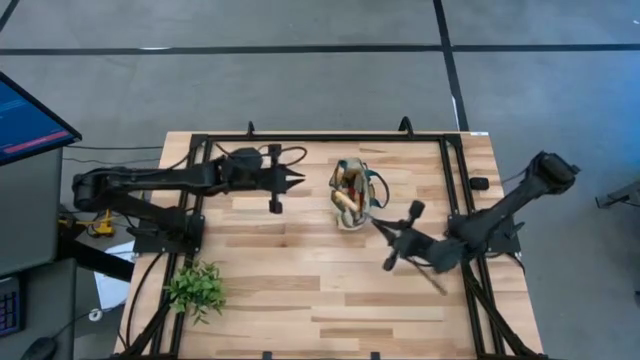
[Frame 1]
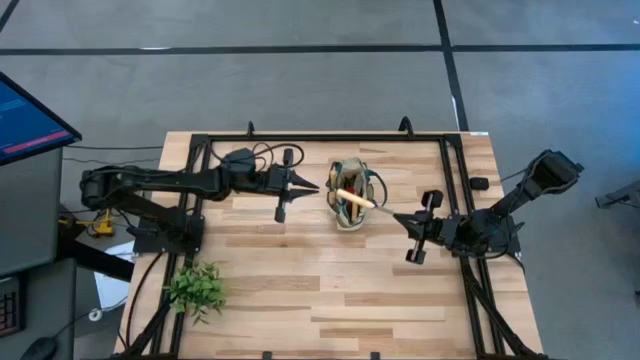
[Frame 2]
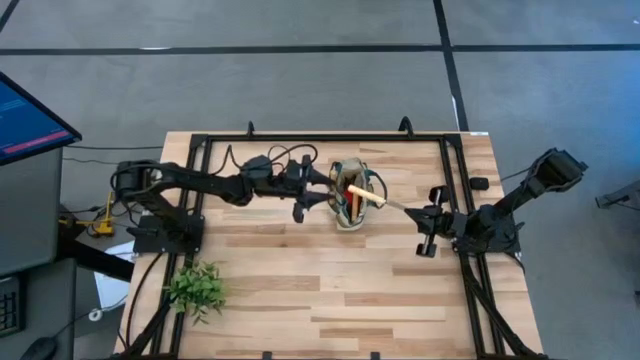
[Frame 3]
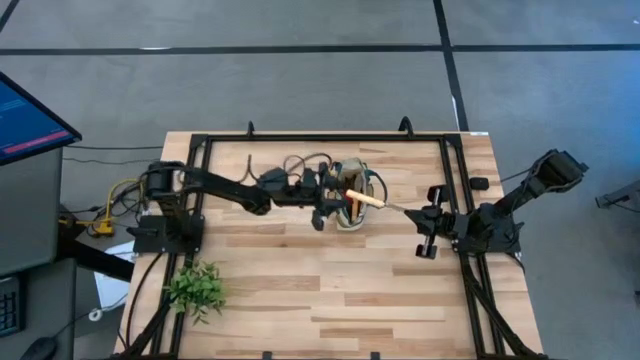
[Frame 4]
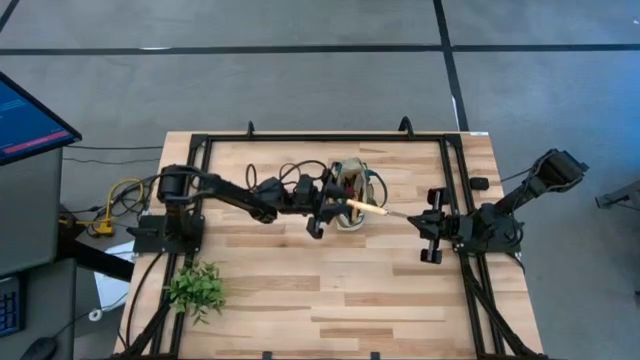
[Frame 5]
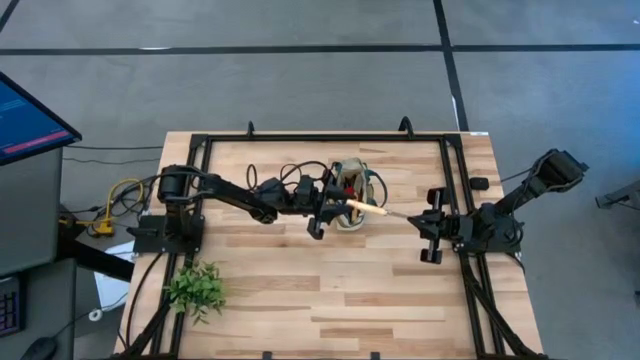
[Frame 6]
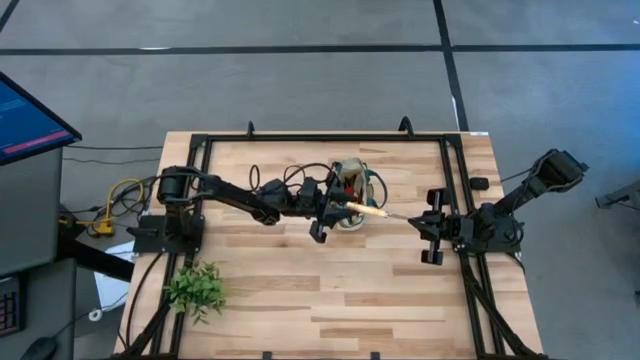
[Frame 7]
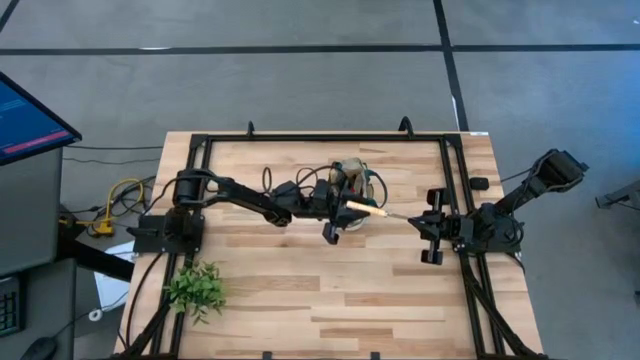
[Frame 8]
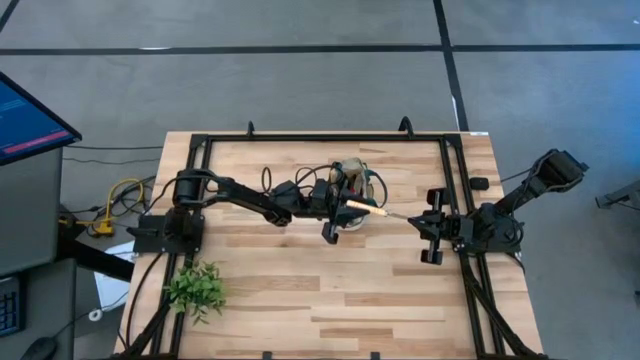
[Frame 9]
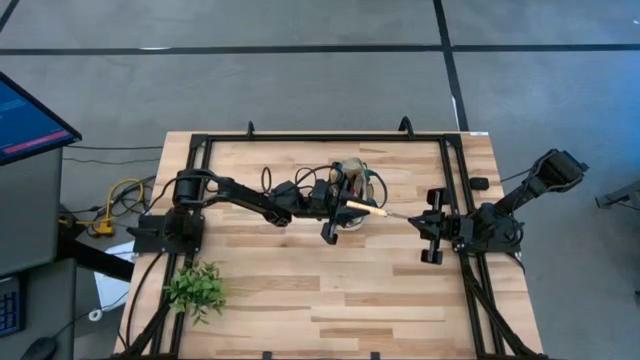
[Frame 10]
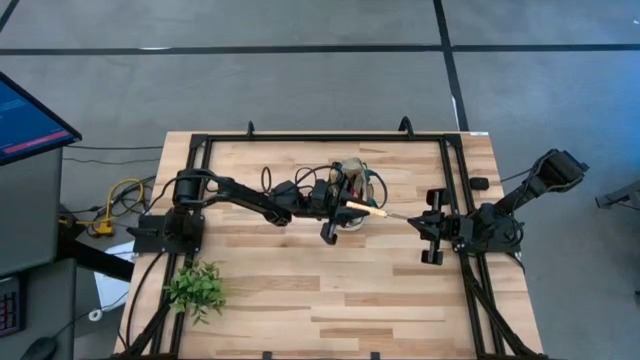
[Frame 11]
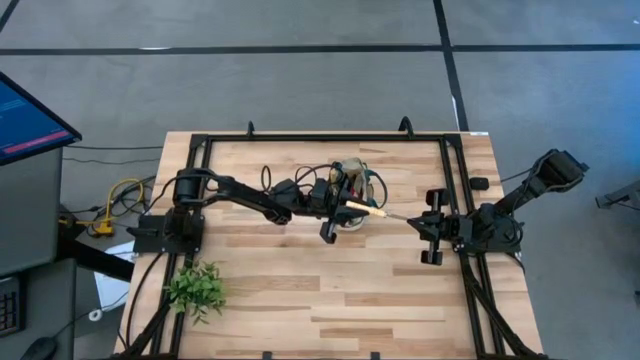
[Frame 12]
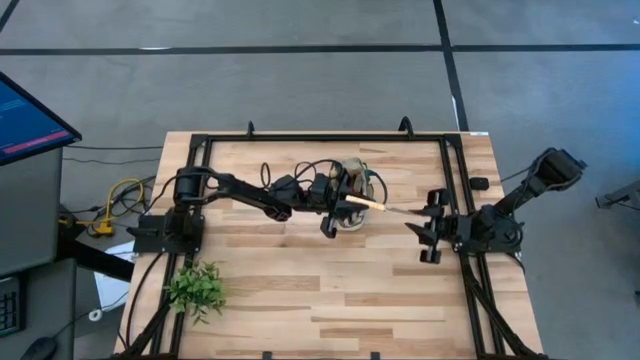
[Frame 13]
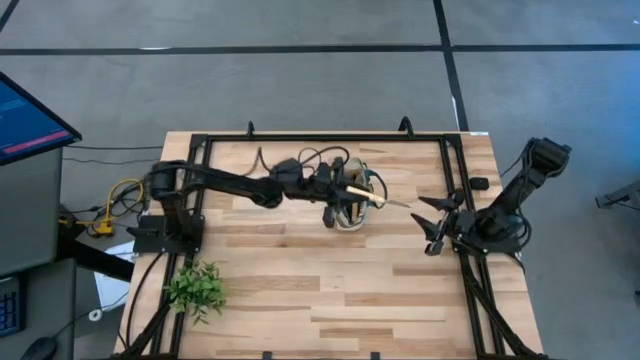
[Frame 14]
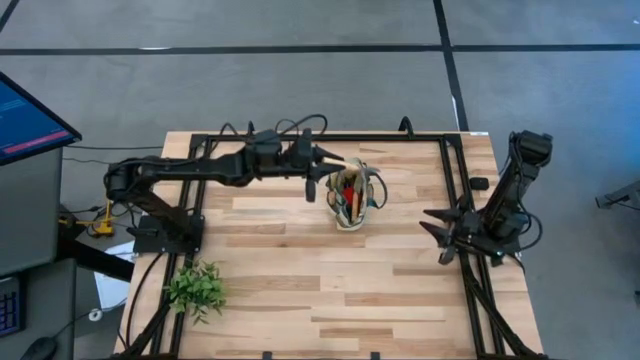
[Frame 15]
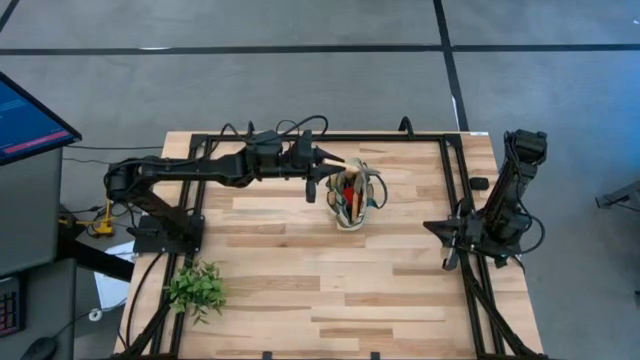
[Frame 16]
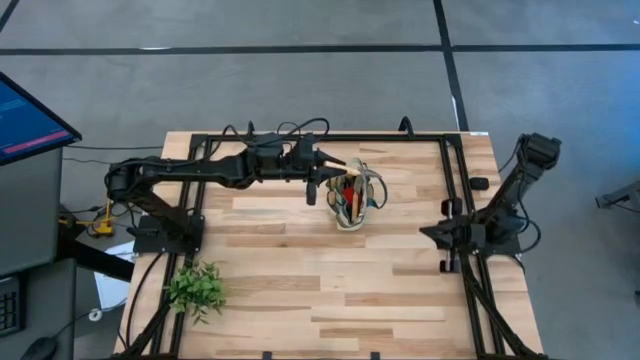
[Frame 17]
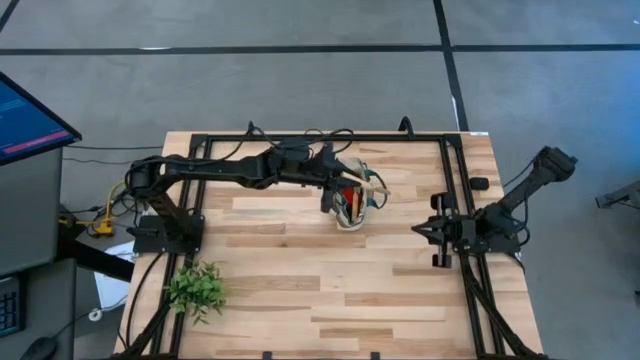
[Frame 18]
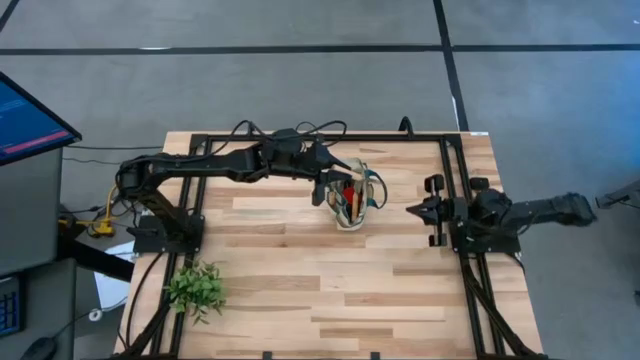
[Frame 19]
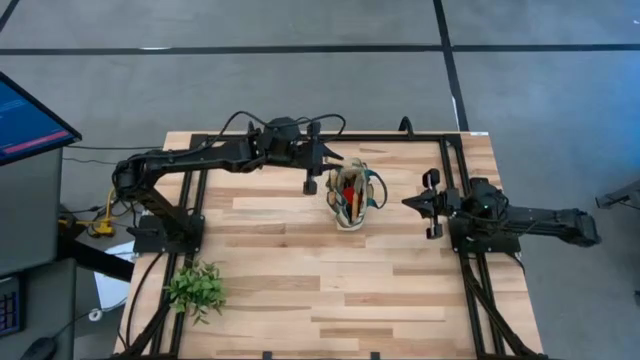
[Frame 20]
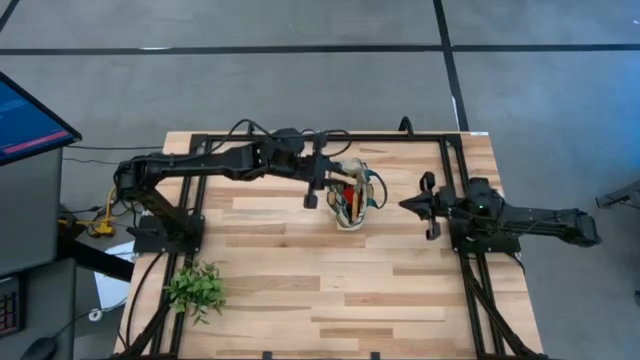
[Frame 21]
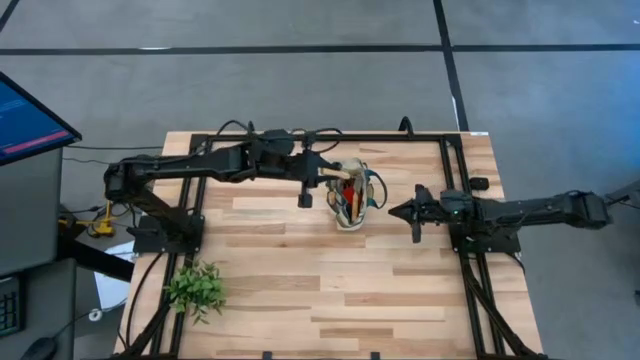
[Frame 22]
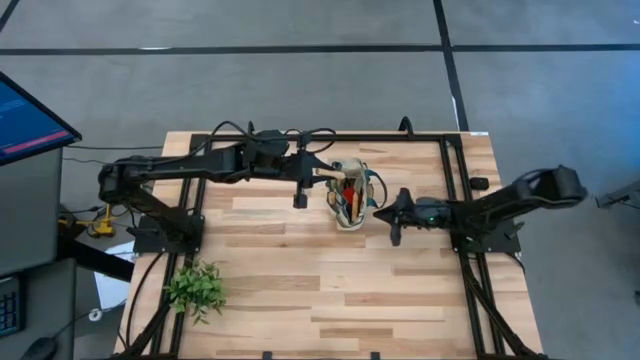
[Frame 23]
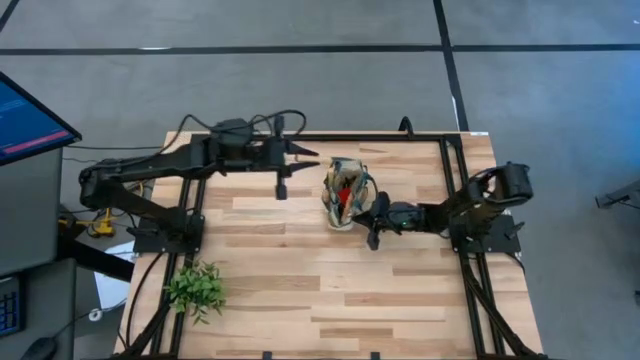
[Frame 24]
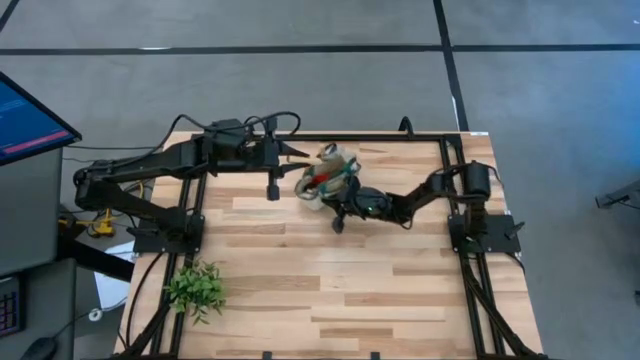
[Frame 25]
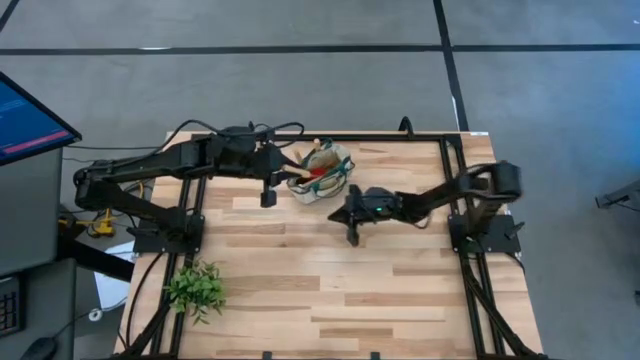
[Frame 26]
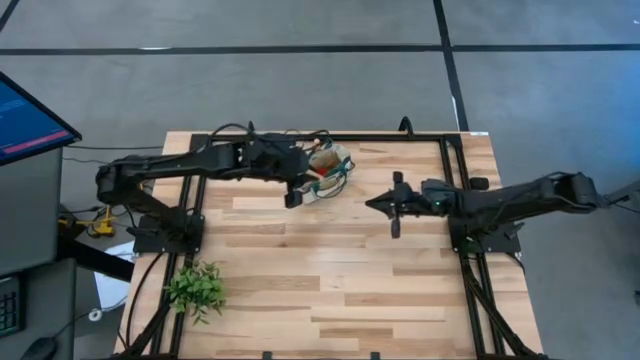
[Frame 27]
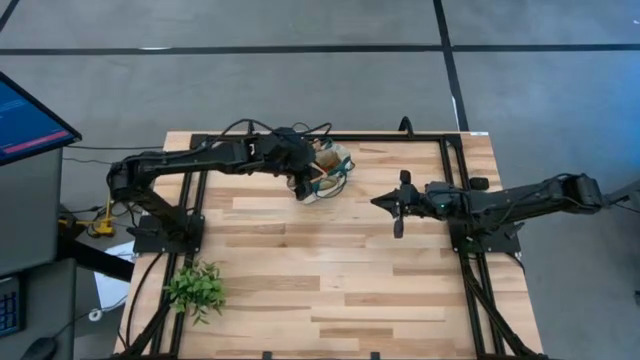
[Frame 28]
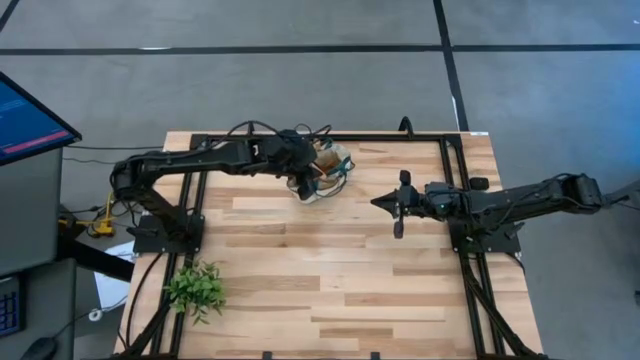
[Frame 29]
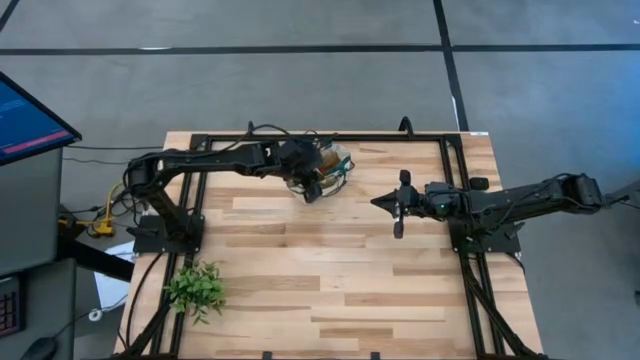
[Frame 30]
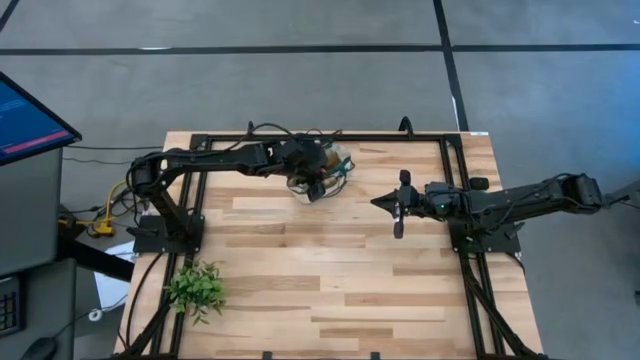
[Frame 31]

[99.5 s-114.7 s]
Task: Pick & Place Garden tools in Gardening bag
Put the brown trowel into the gardening bag

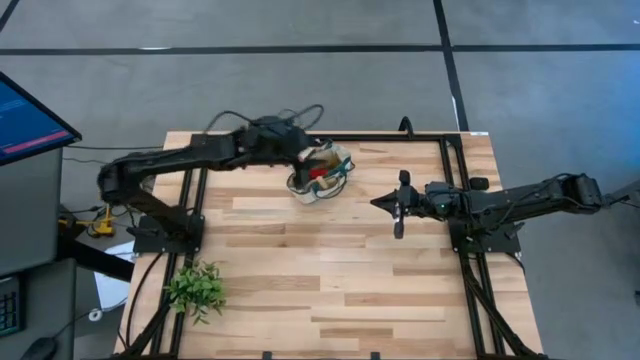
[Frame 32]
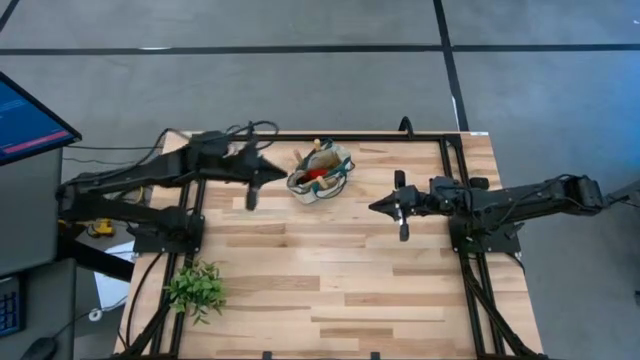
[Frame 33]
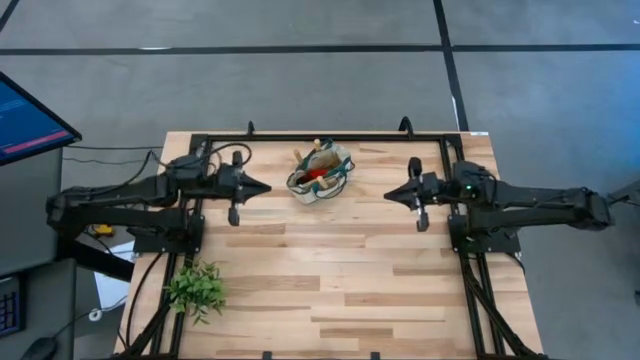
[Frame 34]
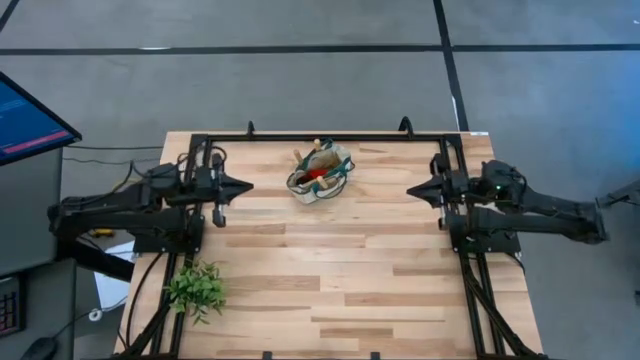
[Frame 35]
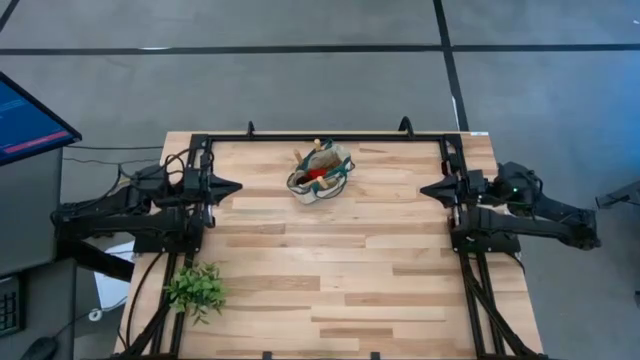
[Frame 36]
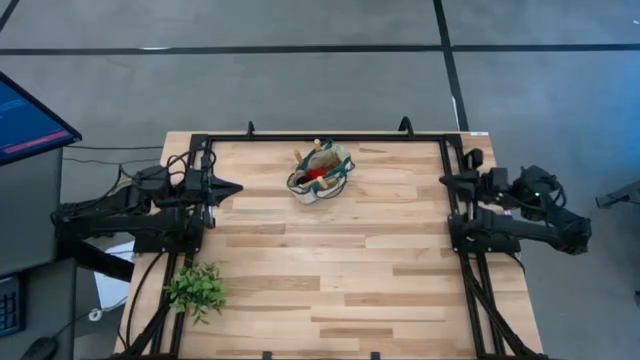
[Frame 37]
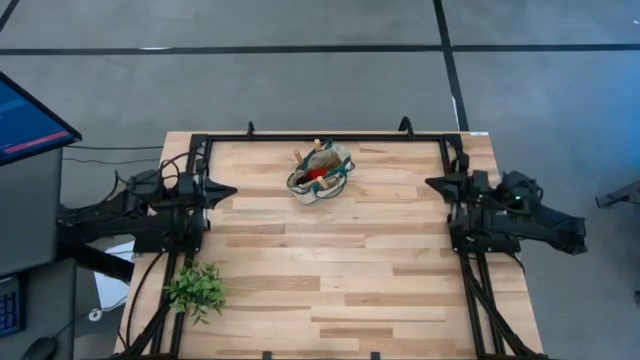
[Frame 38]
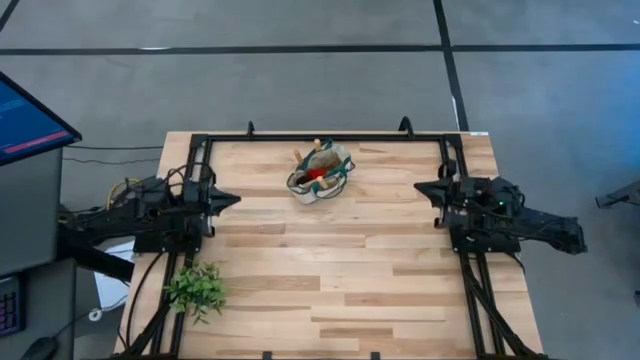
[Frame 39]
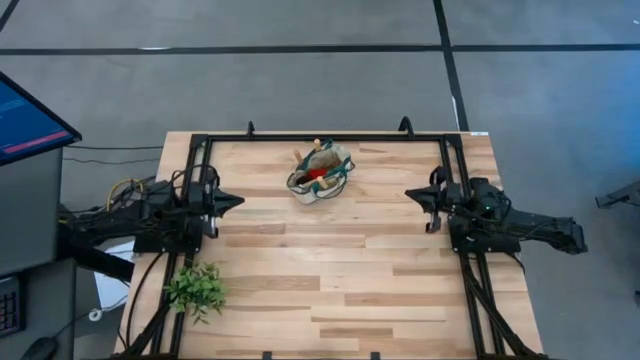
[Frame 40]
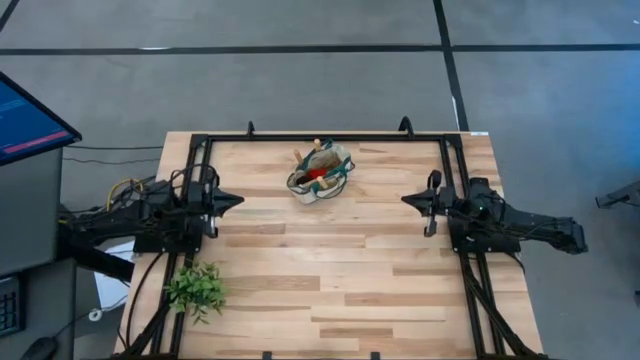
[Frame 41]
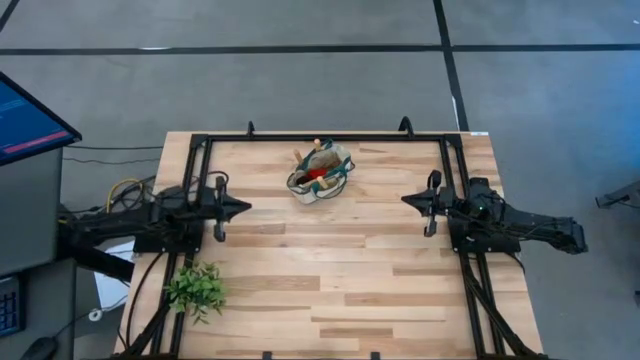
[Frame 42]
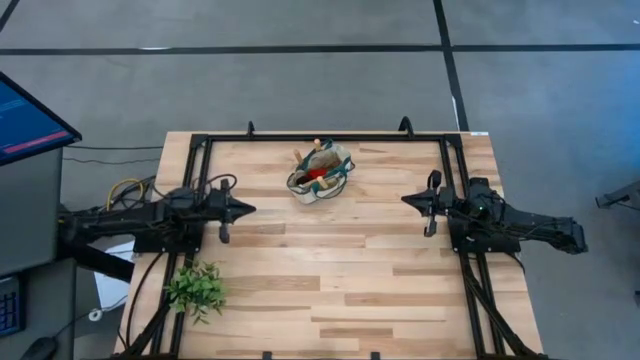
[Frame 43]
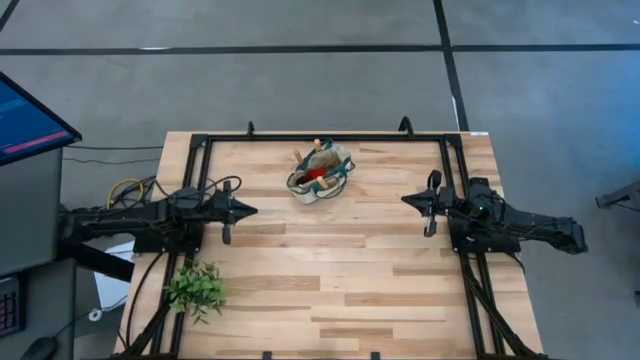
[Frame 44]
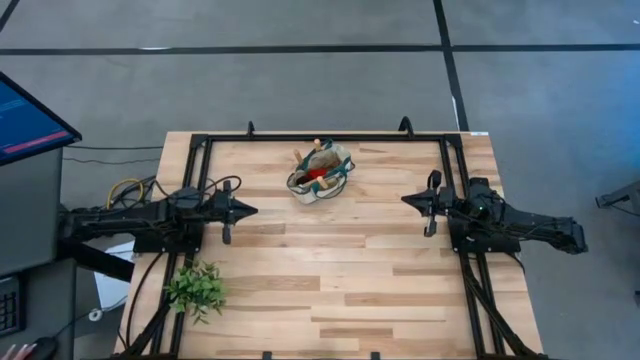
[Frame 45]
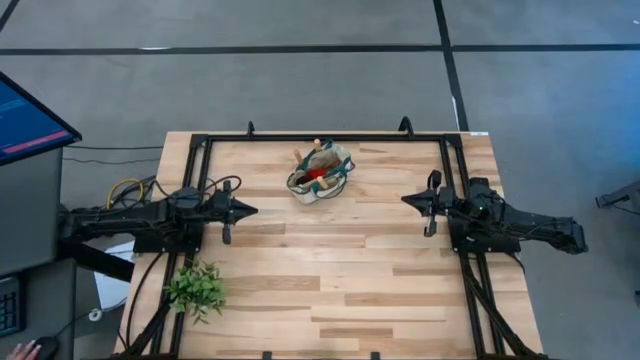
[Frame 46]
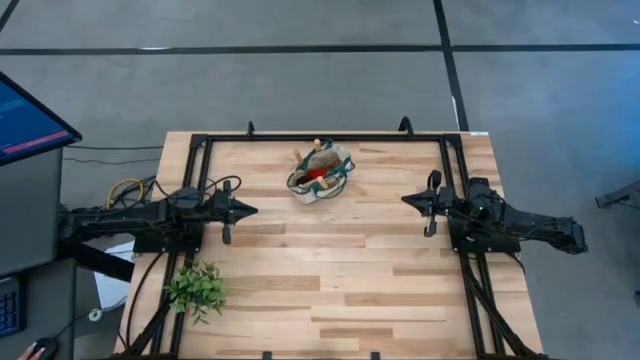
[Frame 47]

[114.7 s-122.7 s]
Return to Home Position
